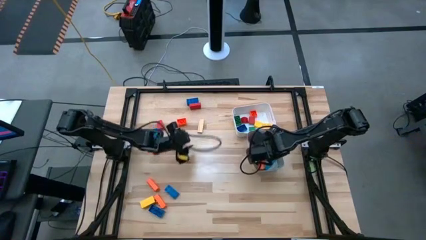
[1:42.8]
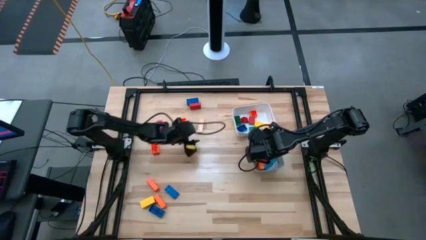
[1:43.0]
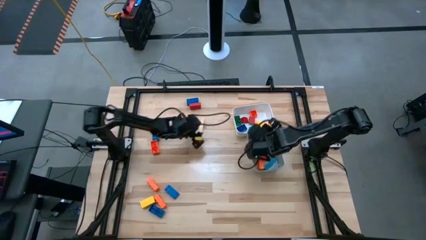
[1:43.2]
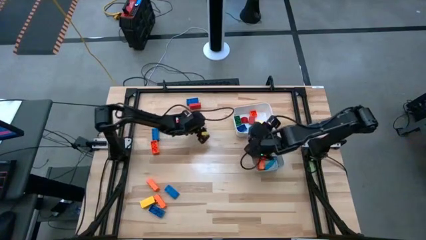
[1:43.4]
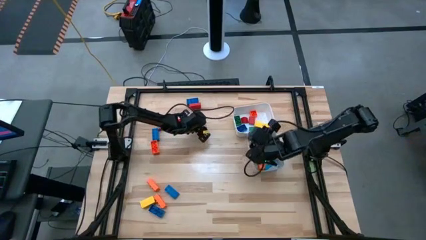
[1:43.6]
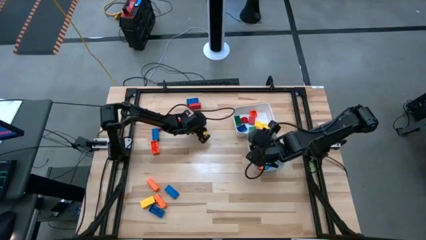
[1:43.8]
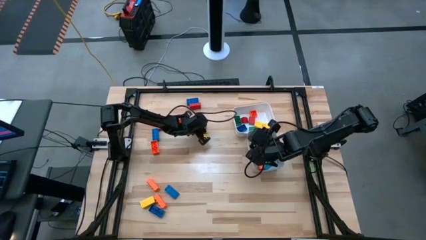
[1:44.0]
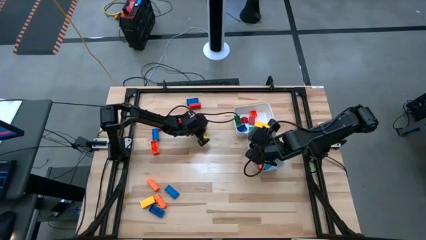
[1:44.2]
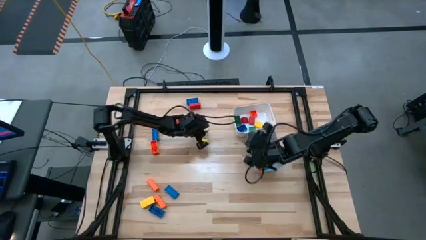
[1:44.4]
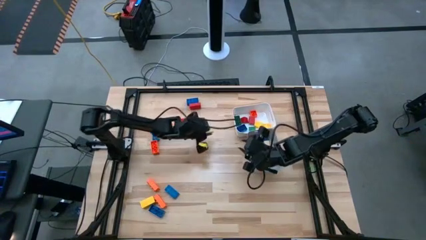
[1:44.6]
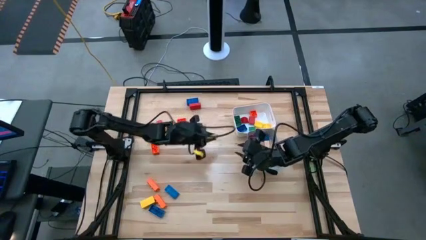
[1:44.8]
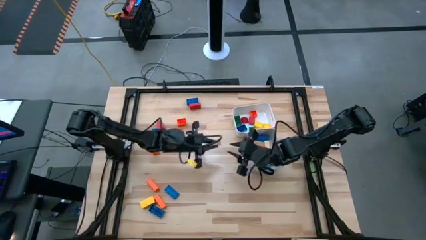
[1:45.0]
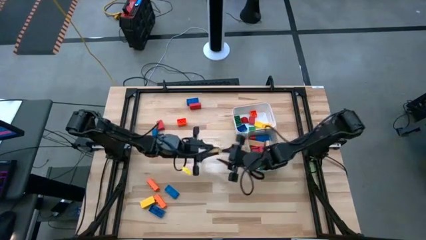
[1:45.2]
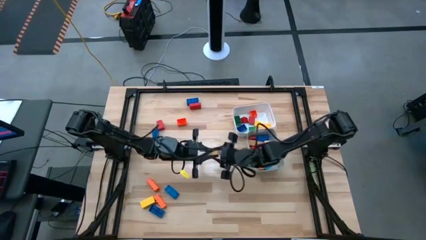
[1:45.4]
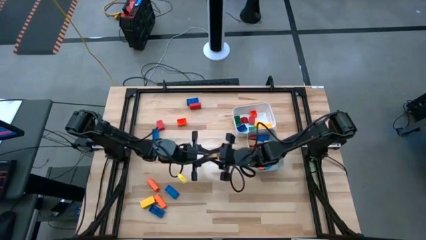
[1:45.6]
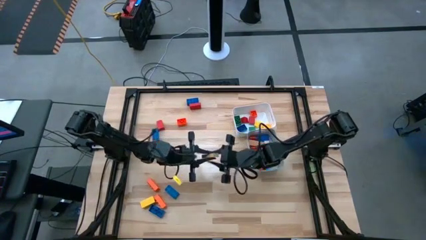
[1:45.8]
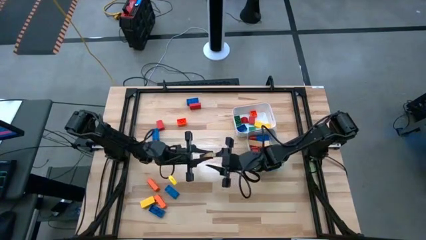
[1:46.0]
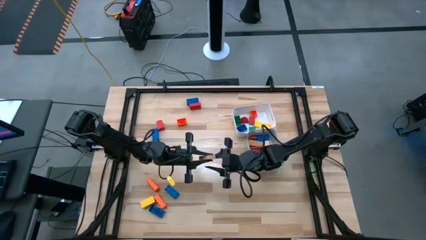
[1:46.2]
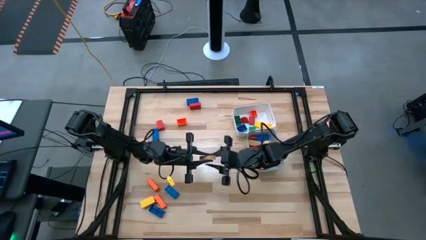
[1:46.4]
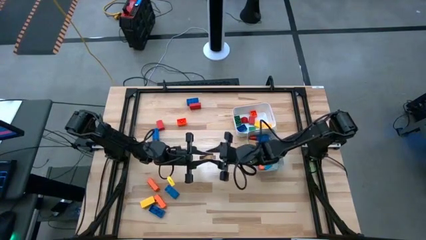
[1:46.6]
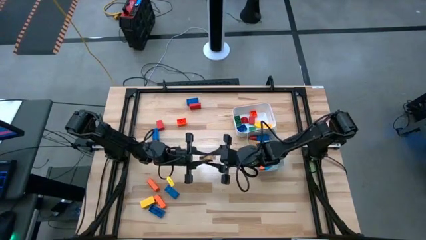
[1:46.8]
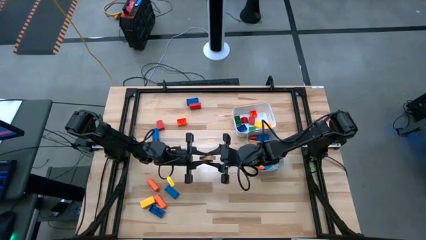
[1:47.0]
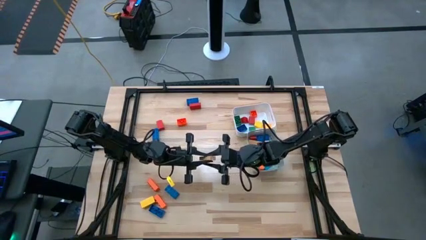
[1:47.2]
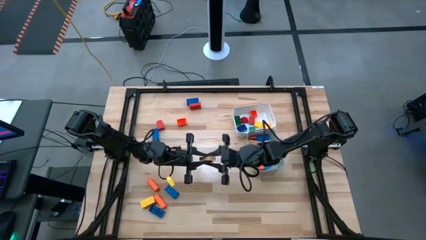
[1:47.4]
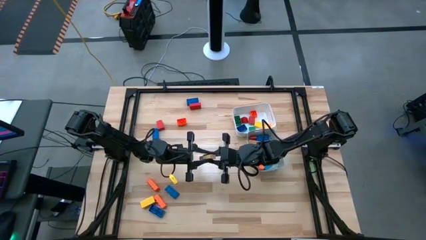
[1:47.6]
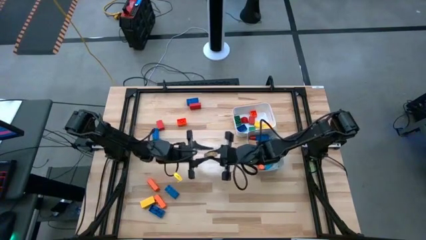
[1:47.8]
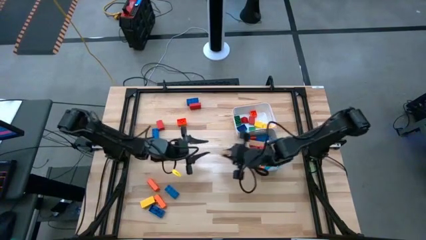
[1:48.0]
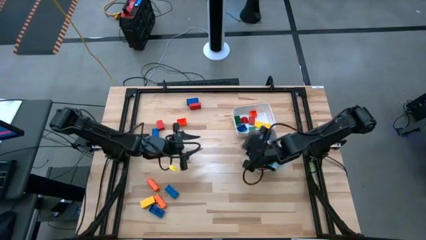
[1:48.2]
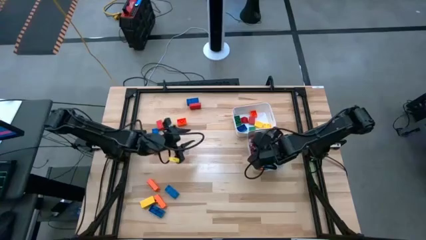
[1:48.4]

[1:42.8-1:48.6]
Task: Sort blocks by size
Put the large brown wooden block into the gray bin

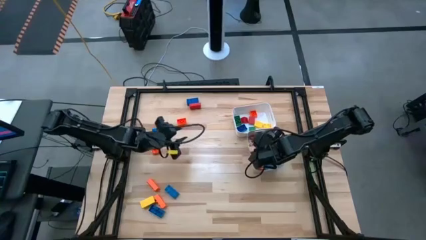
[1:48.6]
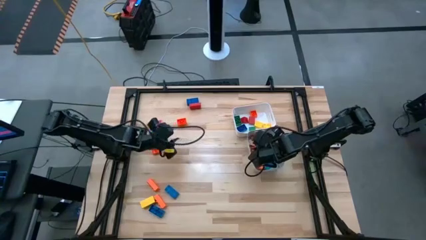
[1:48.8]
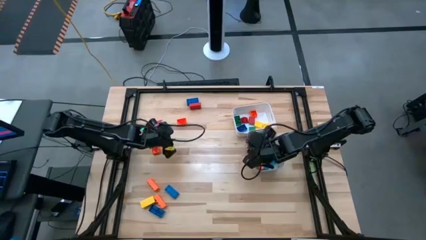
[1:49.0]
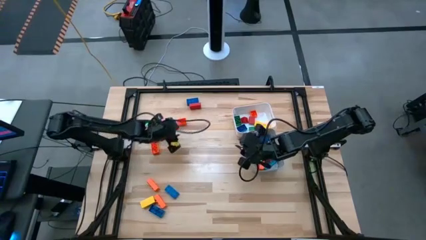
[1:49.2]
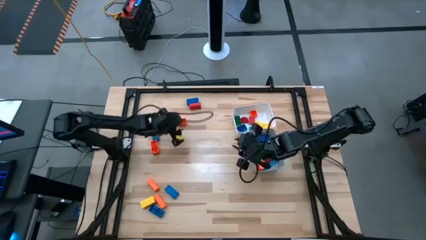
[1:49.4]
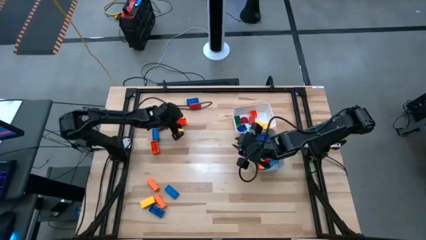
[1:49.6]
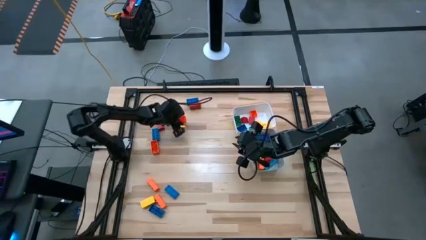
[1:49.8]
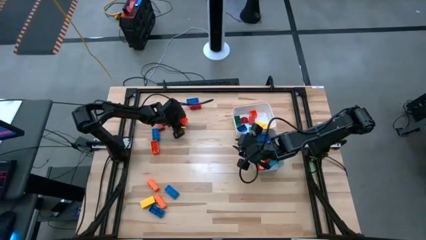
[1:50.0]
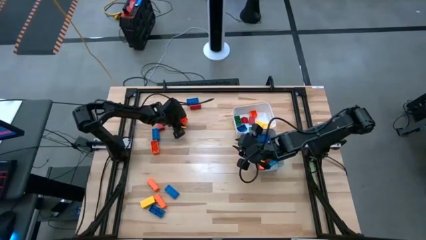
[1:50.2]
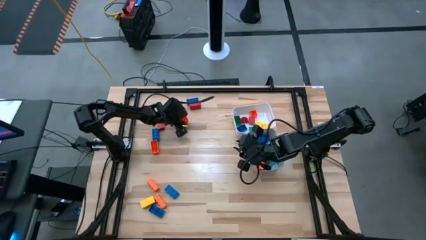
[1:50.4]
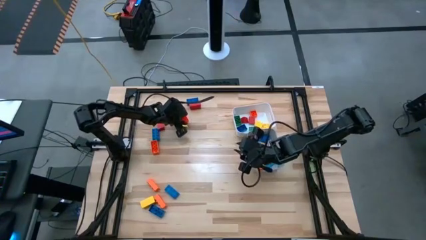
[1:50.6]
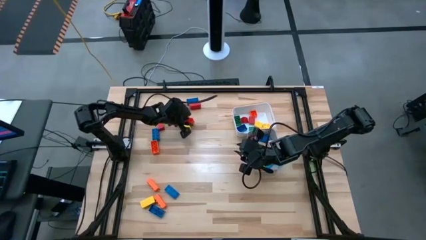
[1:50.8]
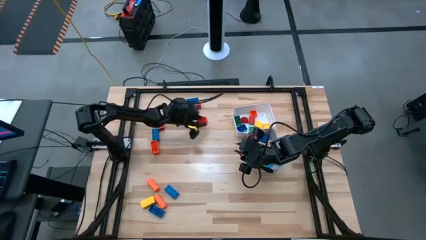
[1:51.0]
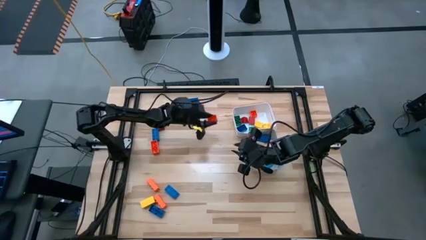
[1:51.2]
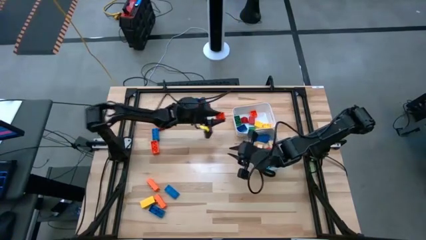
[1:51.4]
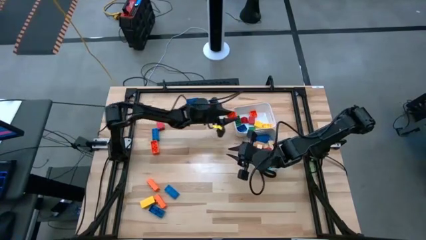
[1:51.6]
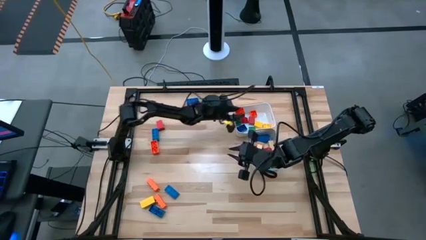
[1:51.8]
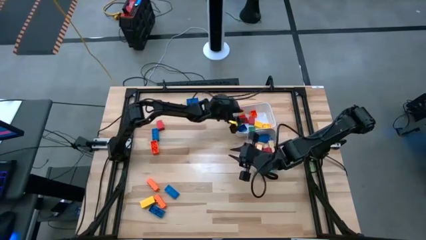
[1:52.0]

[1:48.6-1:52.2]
Put the small orange game piece into the white bin

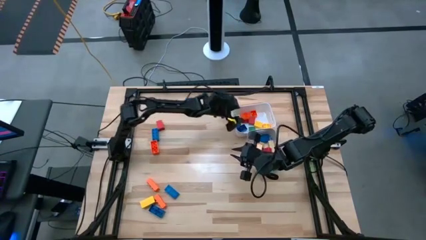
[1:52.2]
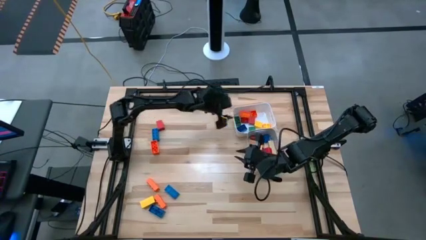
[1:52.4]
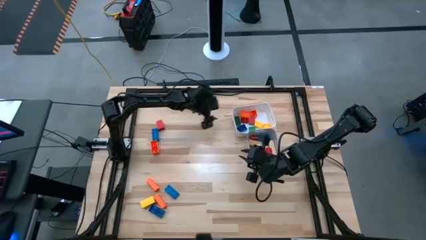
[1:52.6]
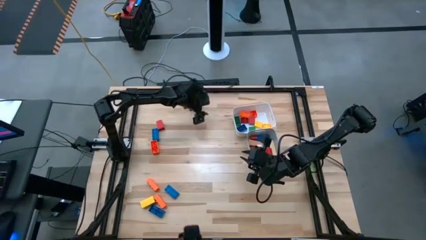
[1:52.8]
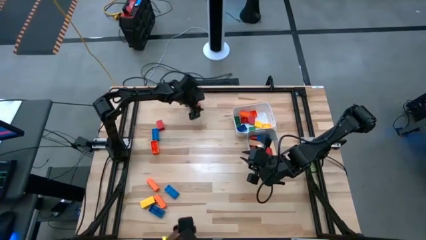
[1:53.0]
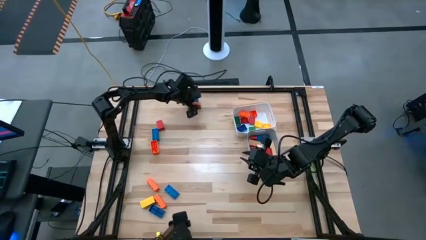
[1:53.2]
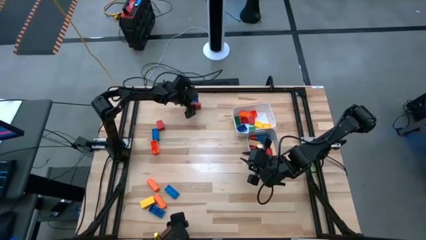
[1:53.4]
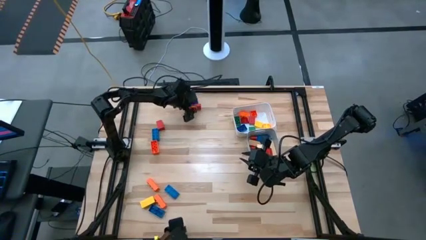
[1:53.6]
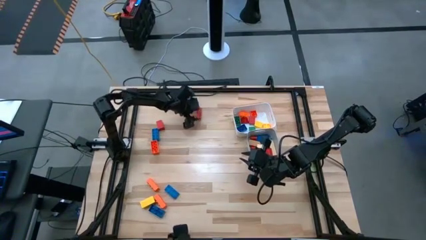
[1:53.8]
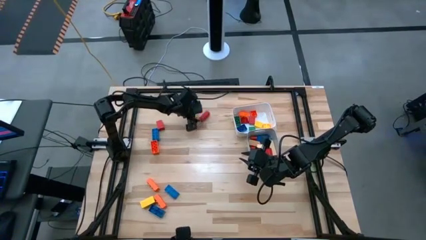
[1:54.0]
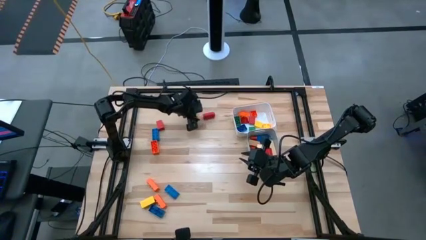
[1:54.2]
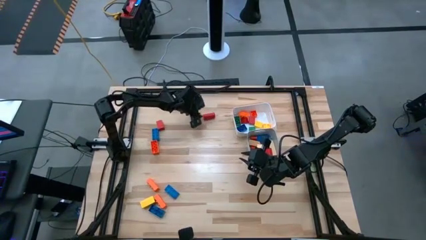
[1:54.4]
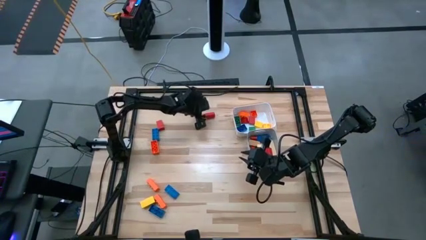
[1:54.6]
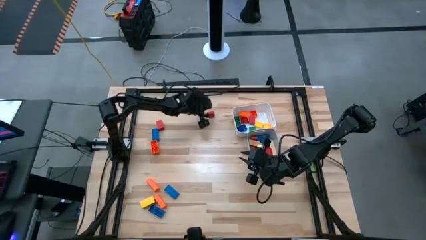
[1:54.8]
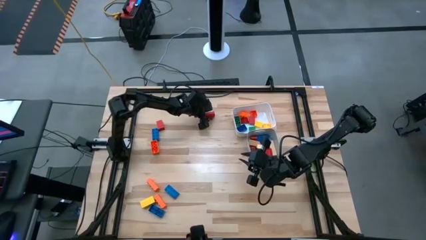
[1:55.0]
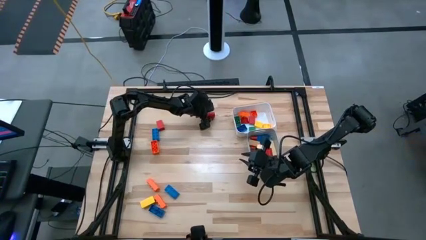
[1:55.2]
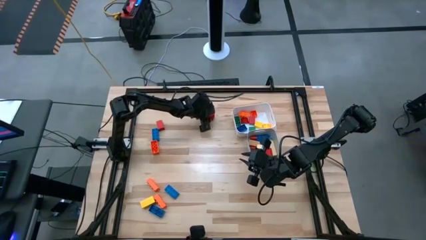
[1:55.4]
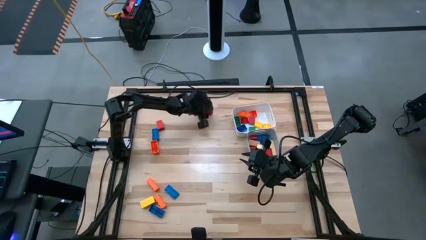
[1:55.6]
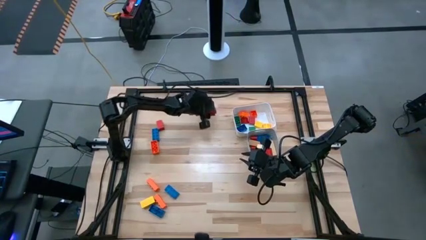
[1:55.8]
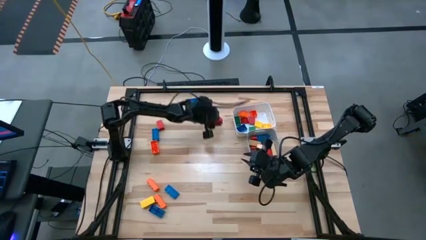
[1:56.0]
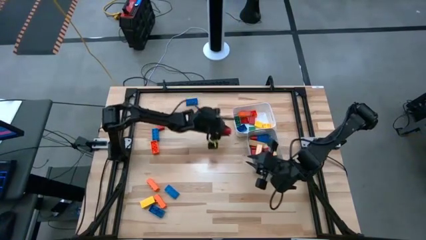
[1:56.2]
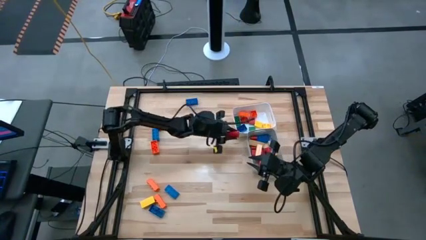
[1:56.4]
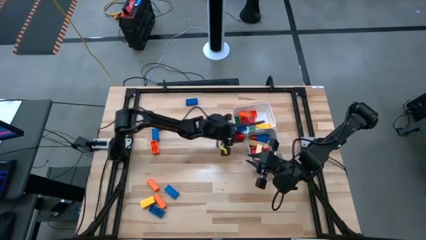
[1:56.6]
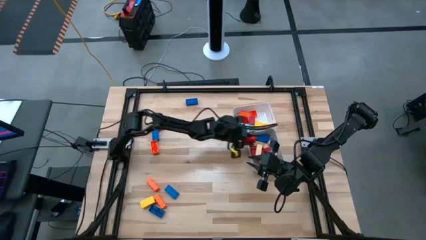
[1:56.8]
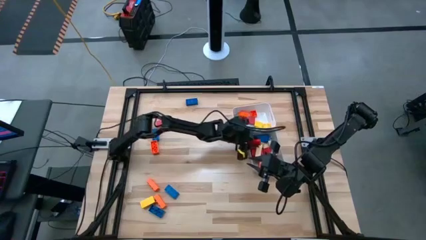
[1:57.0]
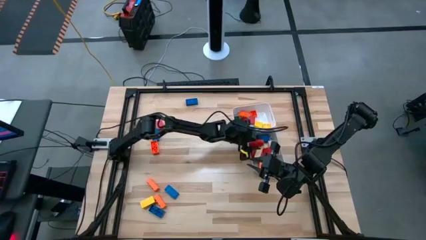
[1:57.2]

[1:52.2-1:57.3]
Put the large red wooden block into the gray bin

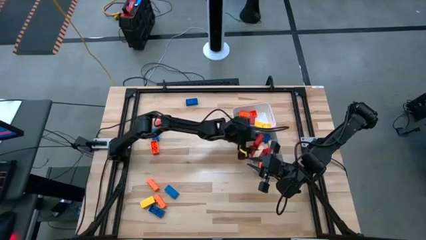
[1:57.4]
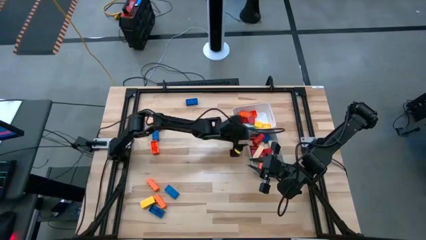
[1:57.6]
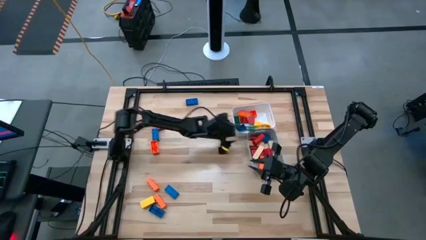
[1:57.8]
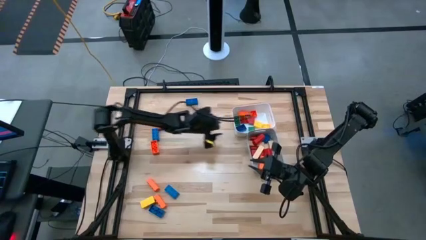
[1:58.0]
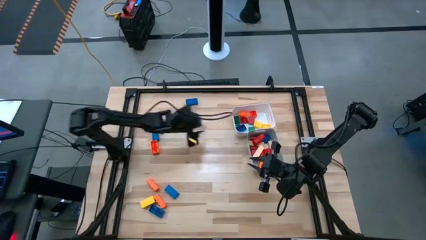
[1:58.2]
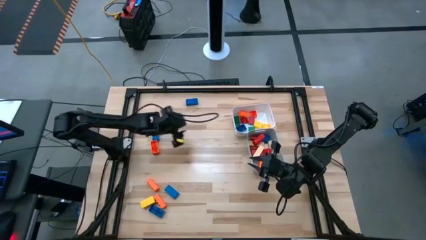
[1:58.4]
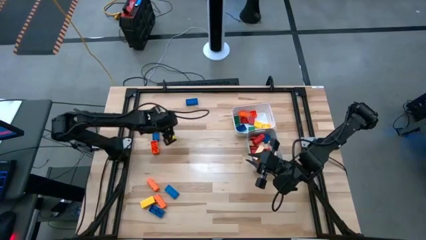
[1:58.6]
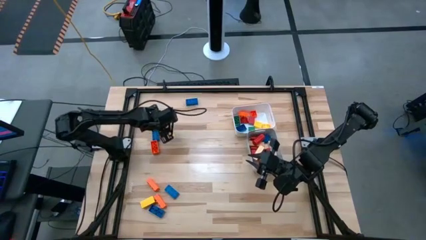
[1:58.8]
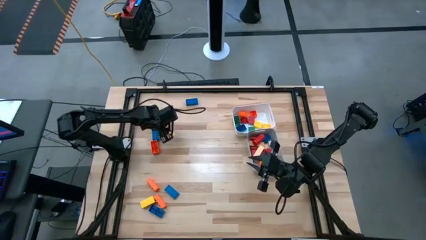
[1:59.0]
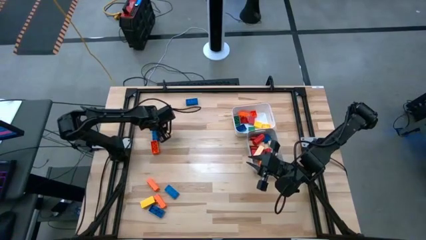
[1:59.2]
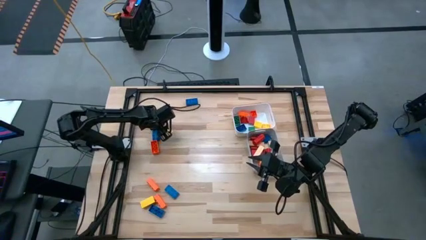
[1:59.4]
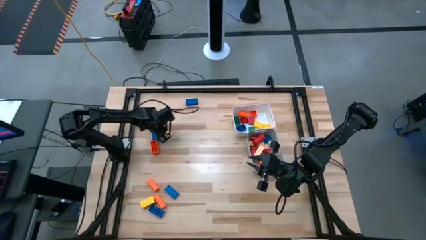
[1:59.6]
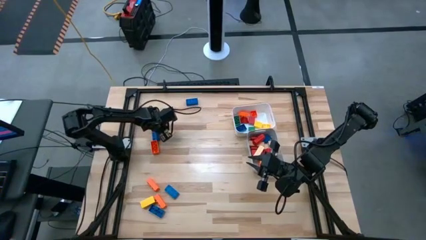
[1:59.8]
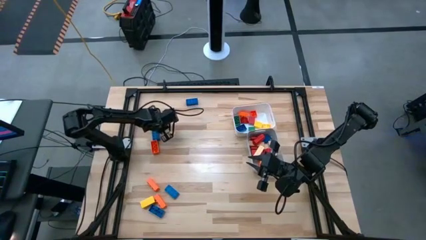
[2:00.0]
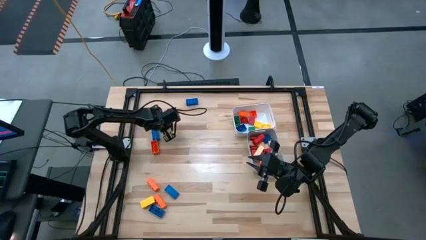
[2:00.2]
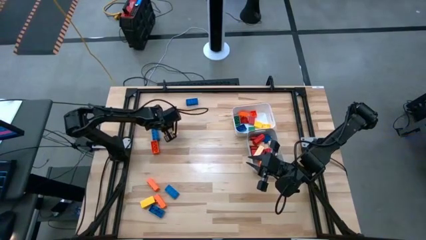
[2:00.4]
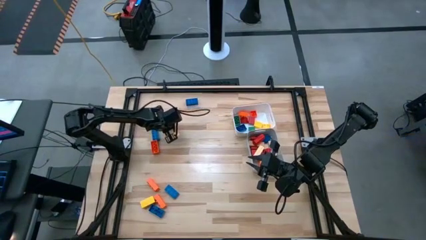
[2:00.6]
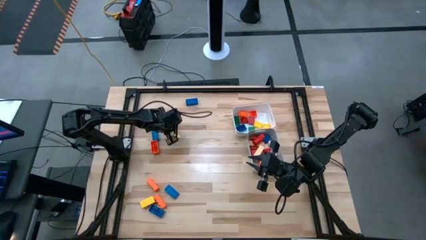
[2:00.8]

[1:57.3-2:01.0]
Put the large red wooden block into the gray bin
